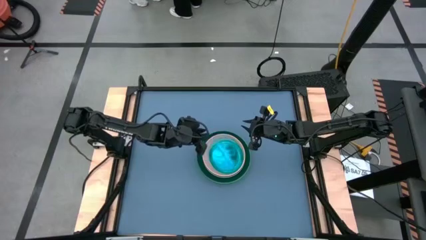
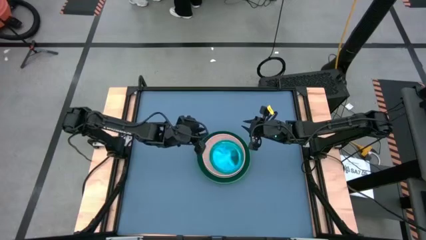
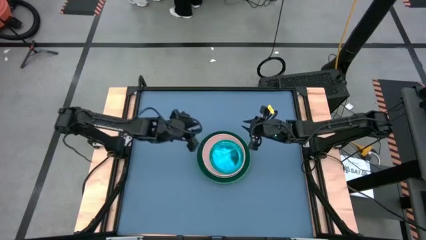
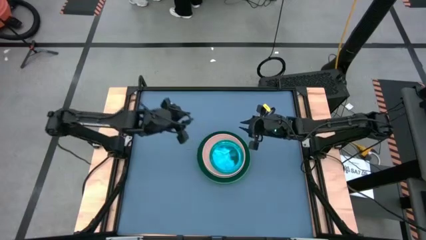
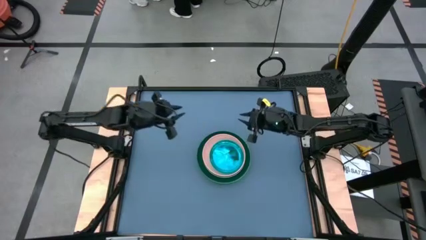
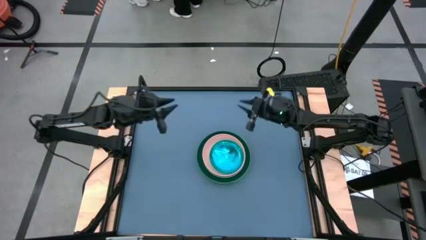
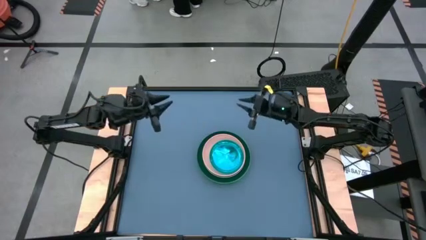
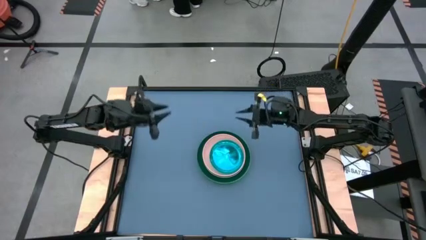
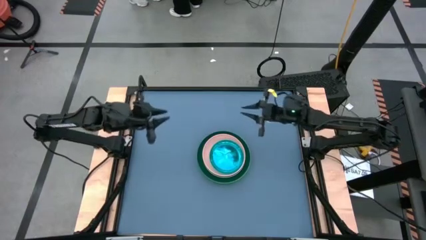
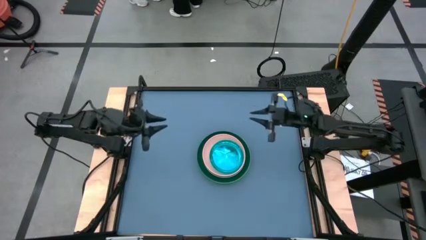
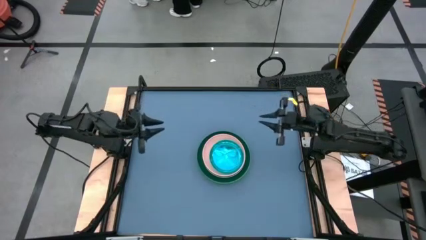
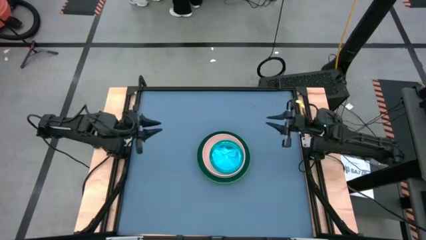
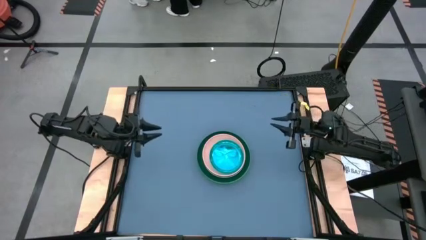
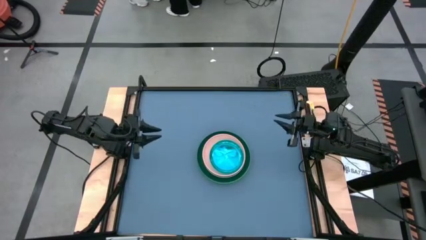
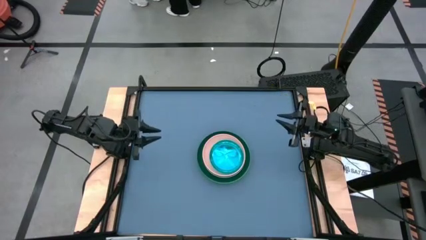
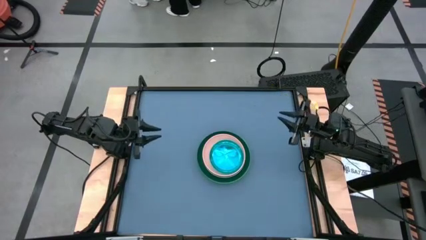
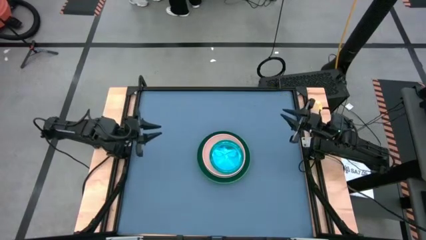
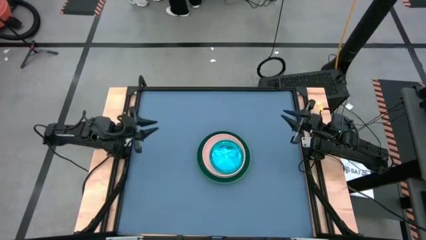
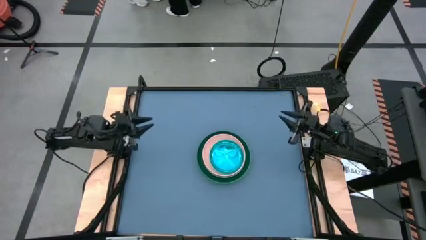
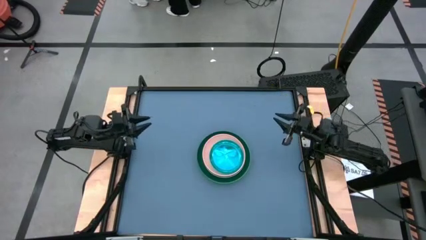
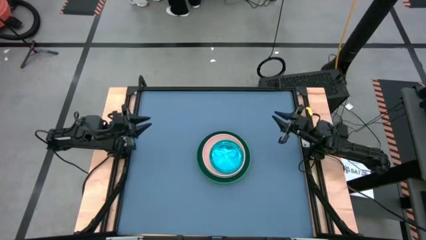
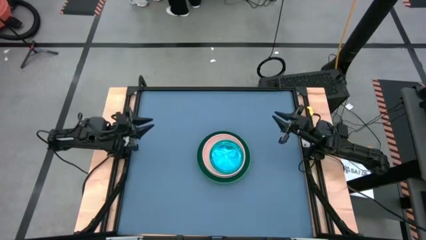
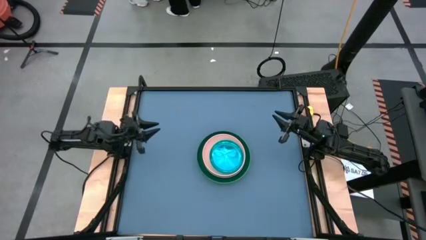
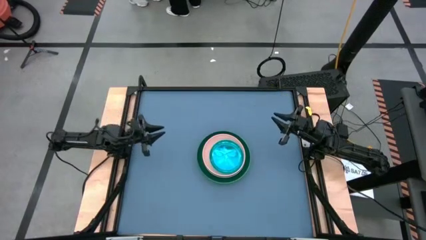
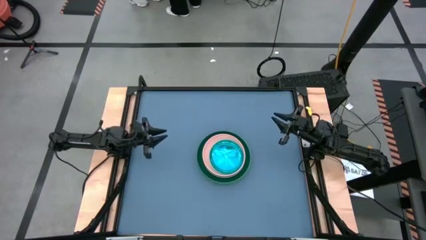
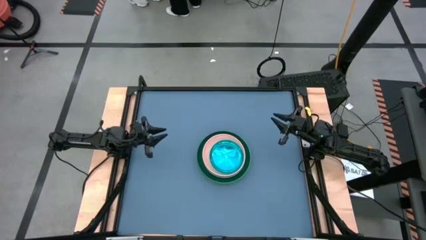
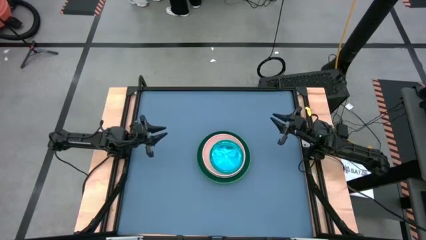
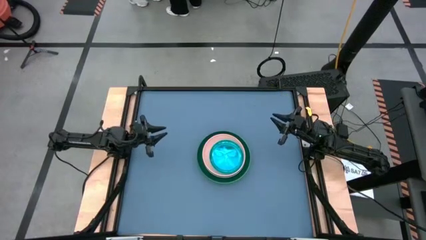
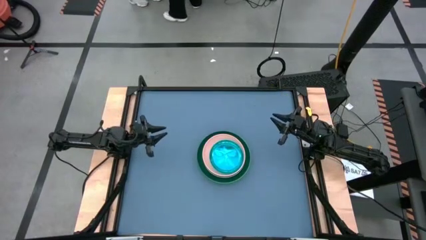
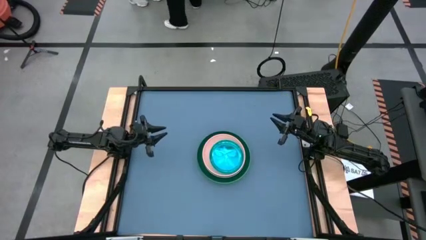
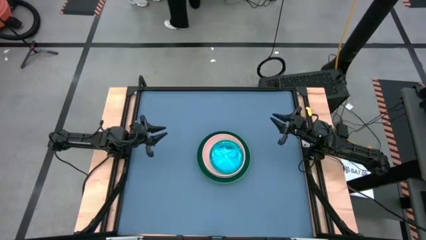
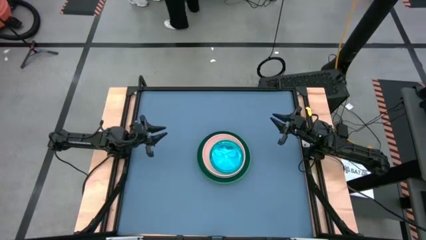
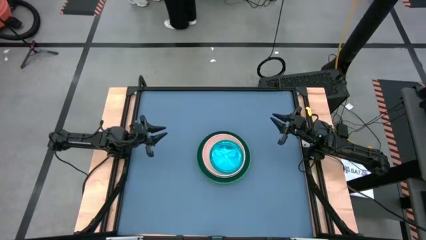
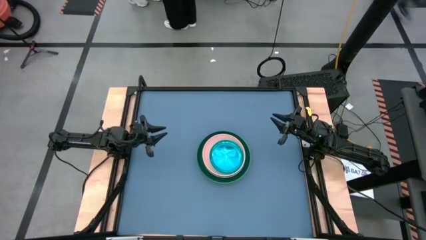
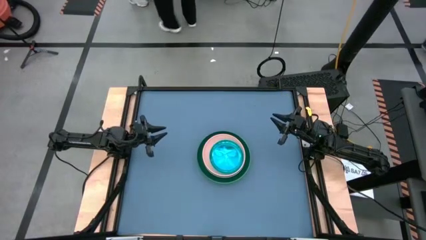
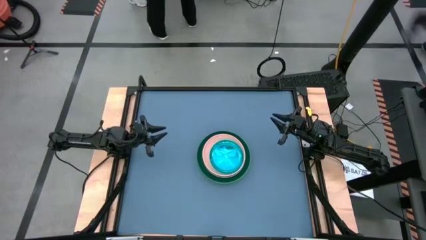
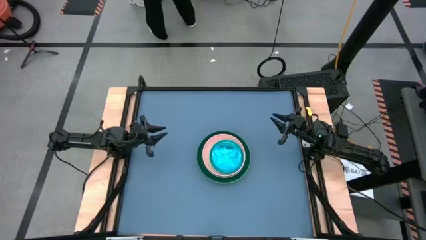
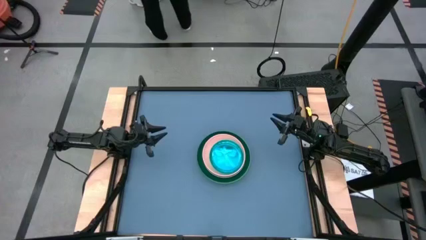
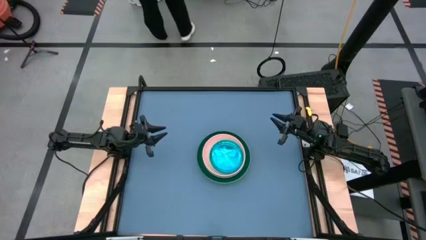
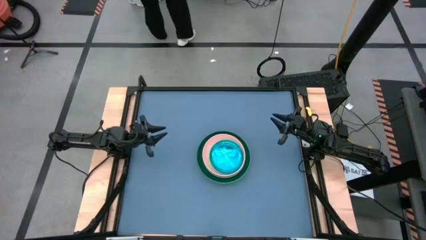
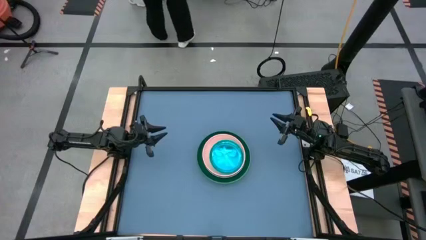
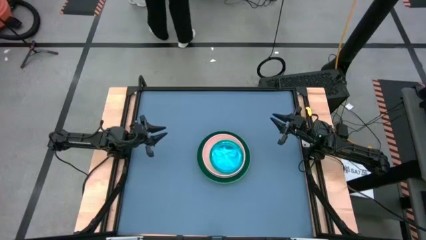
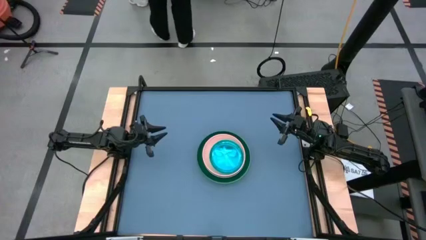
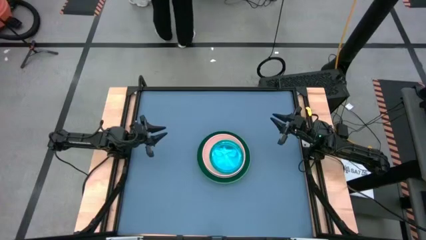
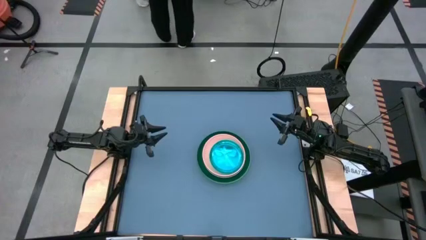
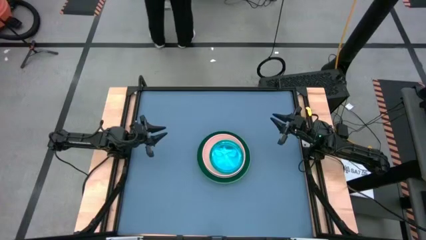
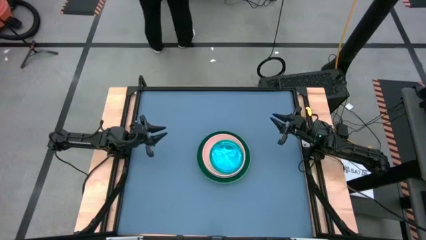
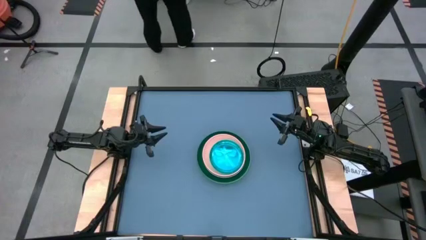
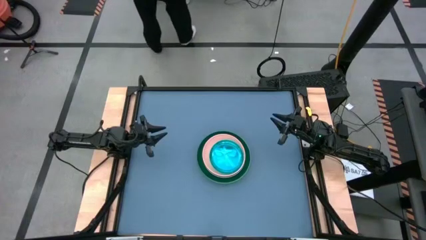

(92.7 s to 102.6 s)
Task: Stack plastic plates
Return to home position

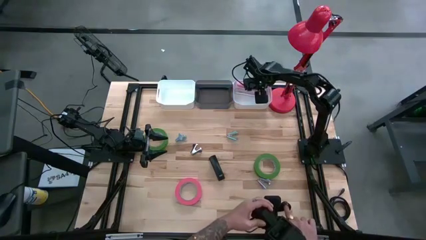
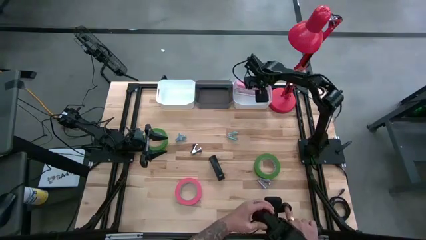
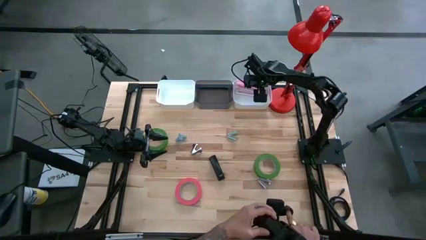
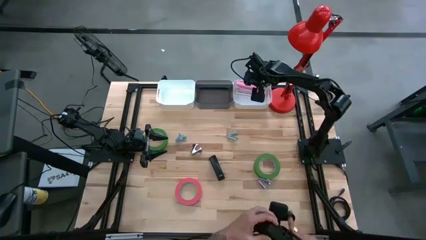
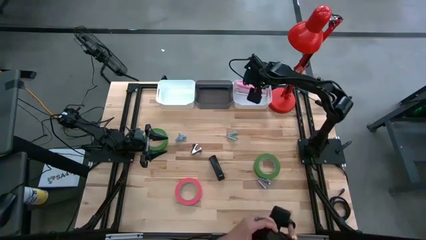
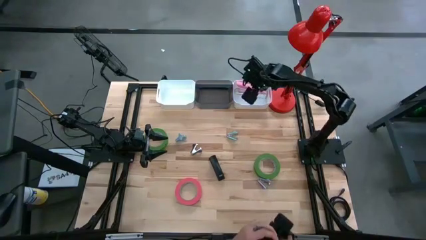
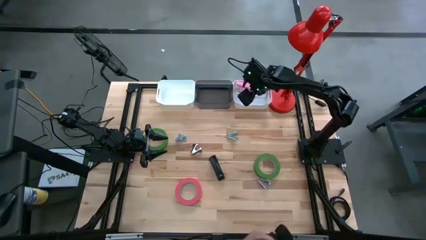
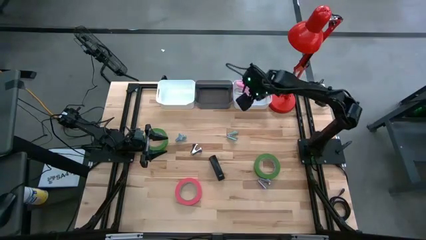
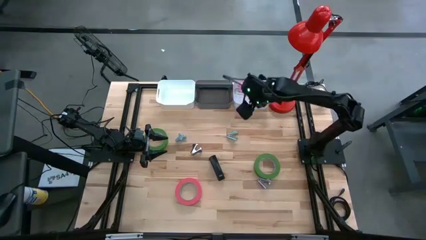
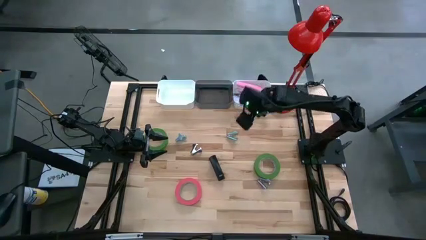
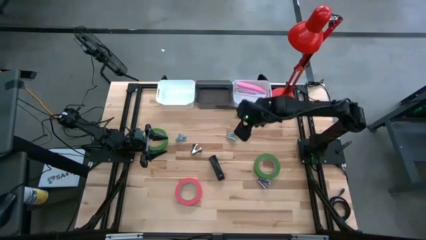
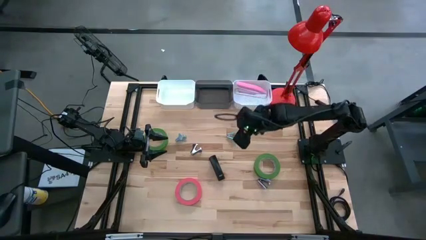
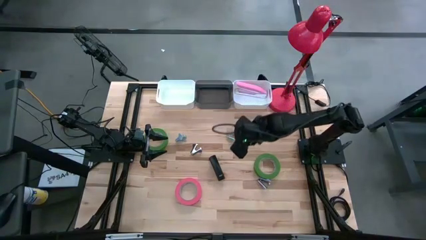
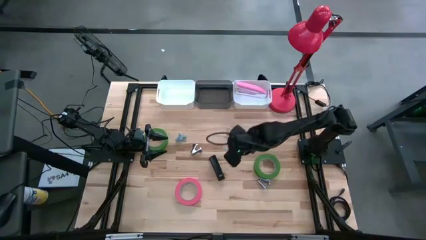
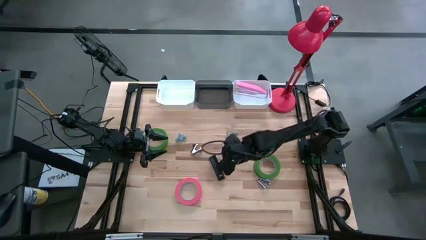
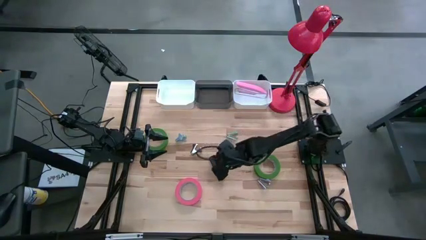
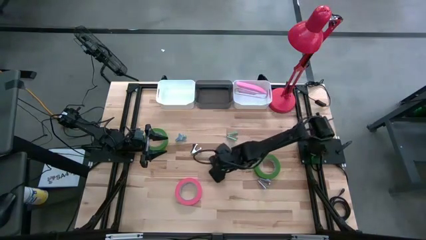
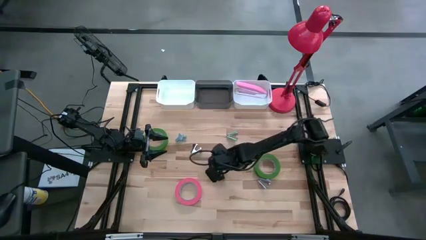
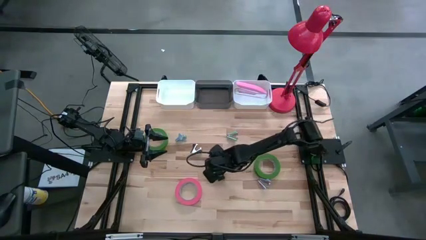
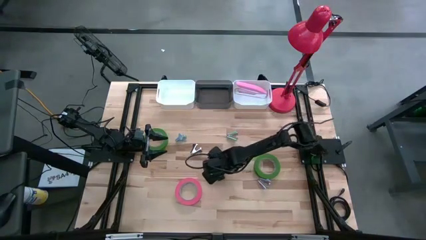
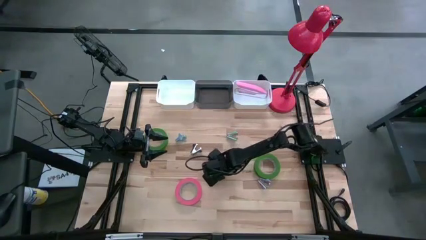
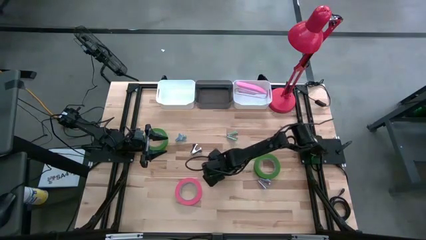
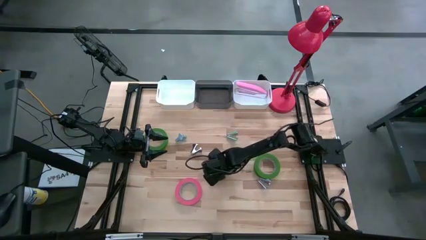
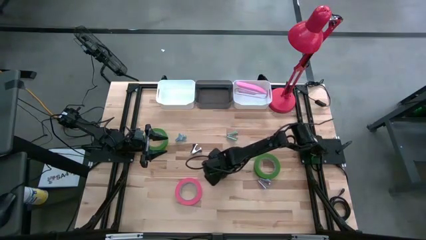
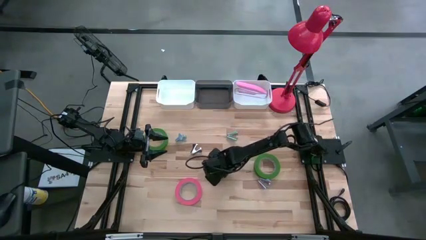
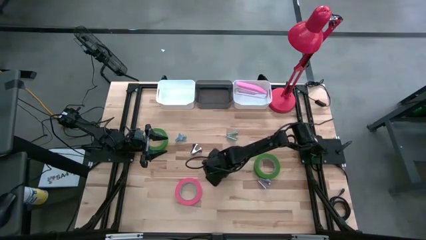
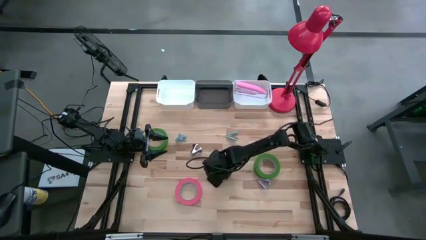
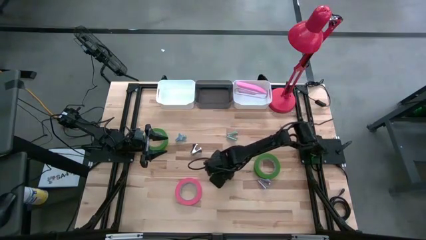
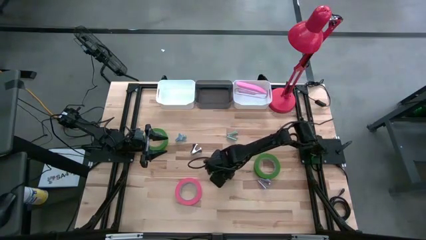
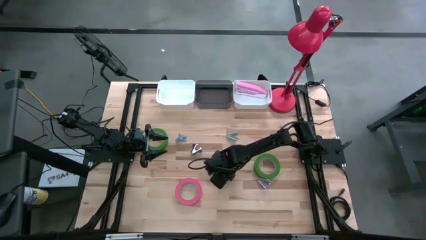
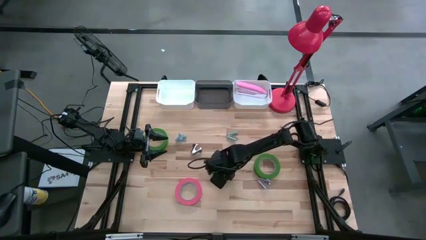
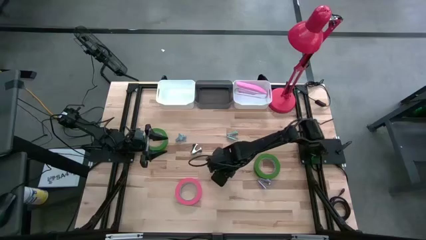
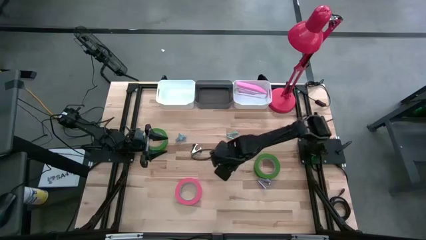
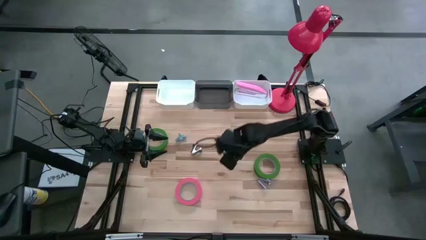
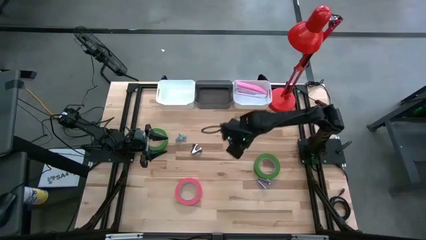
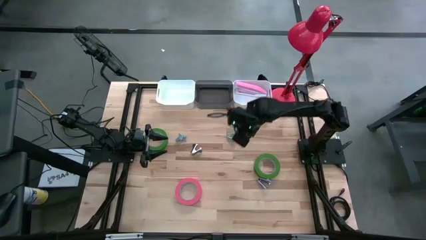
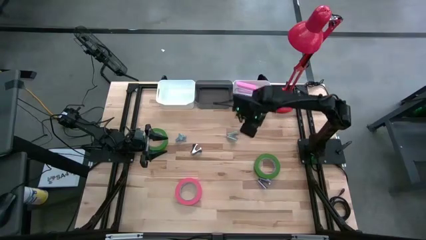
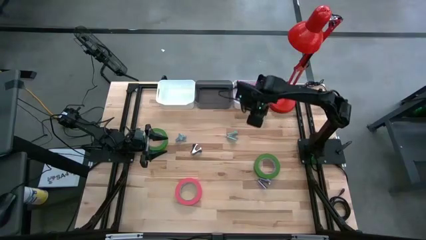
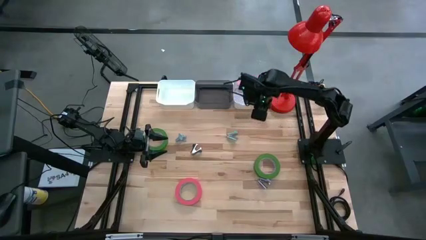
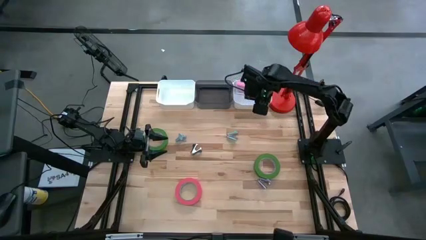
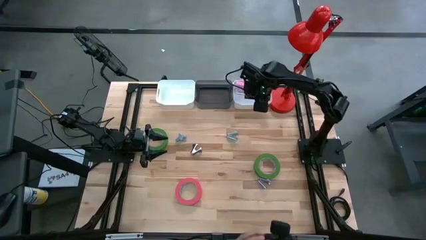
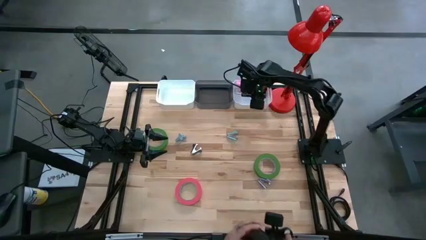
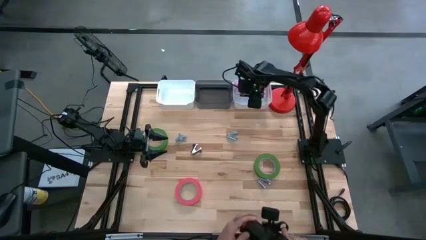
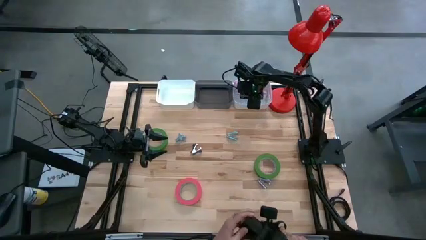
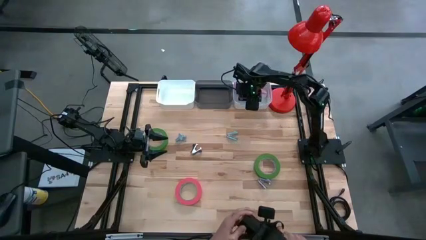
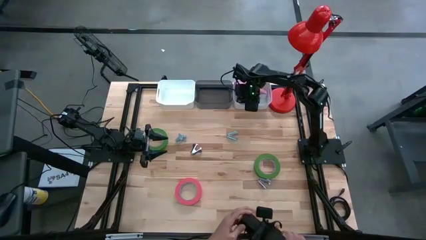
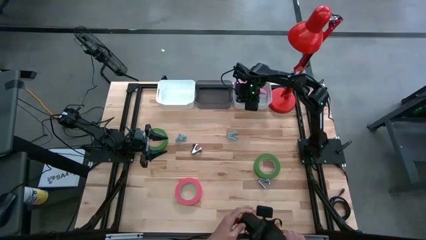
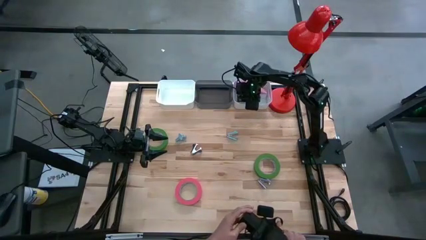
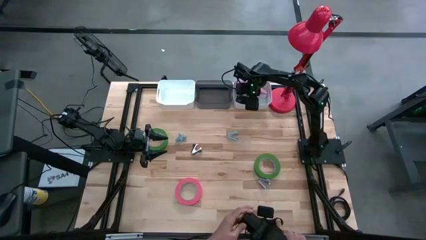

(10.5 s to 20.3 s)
Task: Pick and place Stapler, Stapler remover, tape
Put the black stapler into the right white bin
